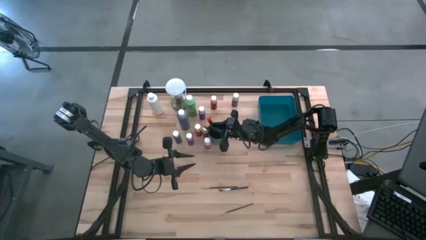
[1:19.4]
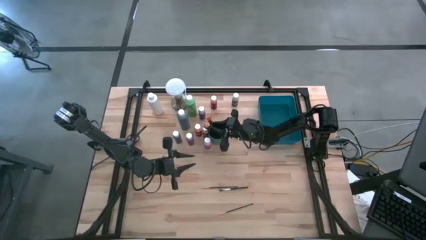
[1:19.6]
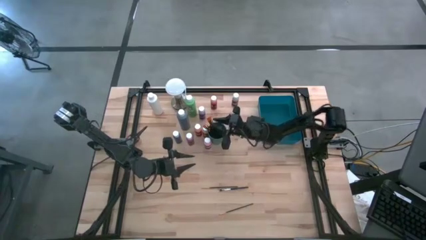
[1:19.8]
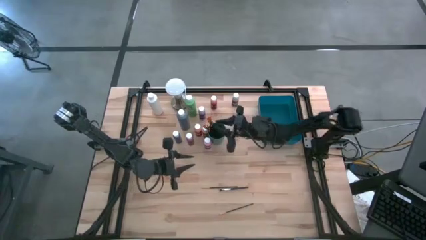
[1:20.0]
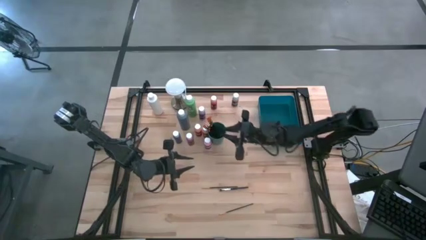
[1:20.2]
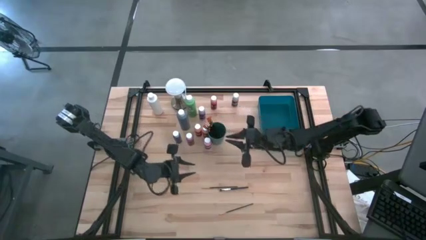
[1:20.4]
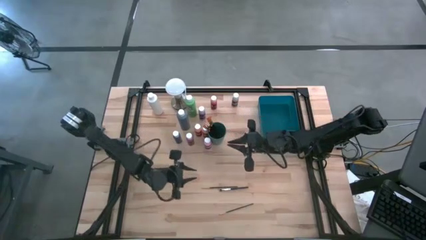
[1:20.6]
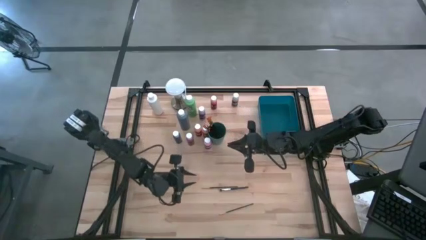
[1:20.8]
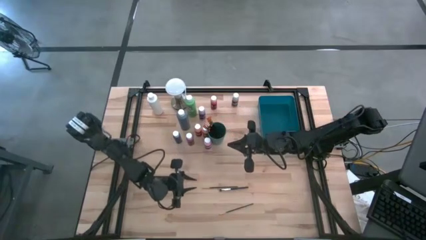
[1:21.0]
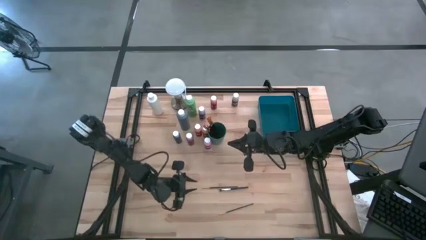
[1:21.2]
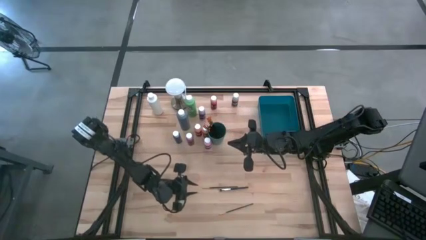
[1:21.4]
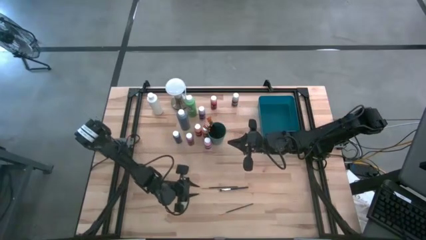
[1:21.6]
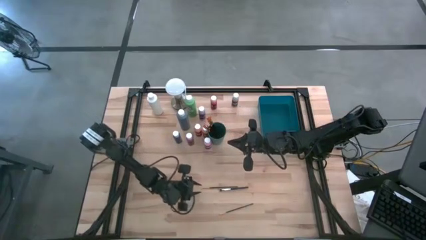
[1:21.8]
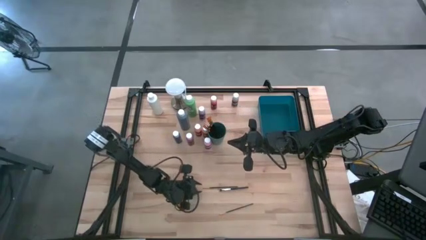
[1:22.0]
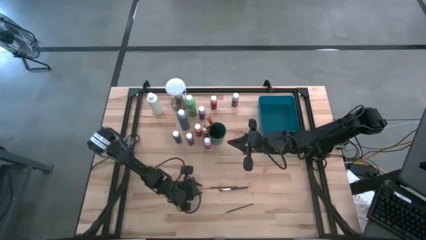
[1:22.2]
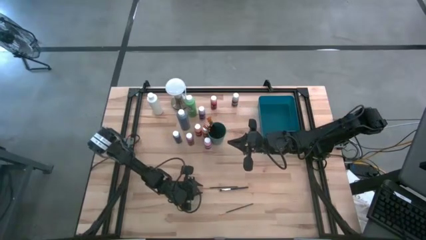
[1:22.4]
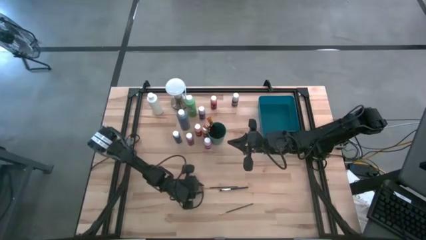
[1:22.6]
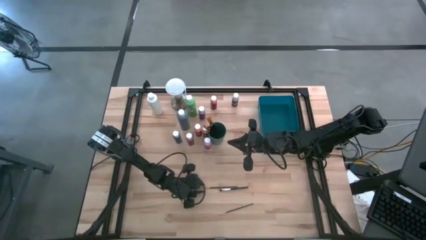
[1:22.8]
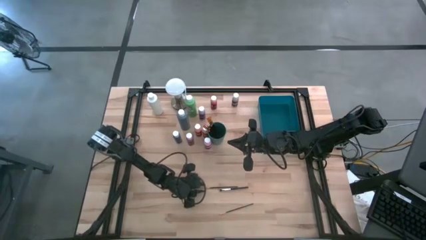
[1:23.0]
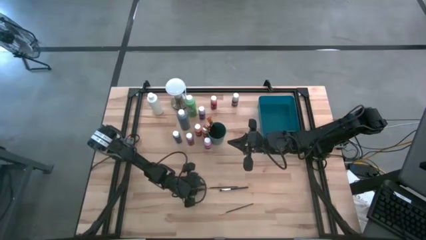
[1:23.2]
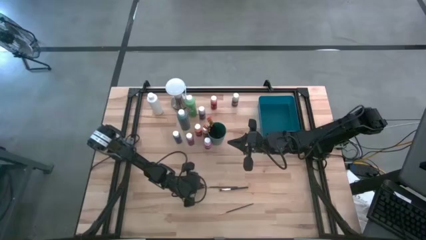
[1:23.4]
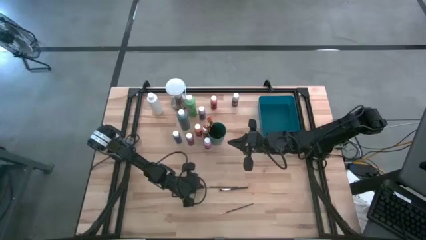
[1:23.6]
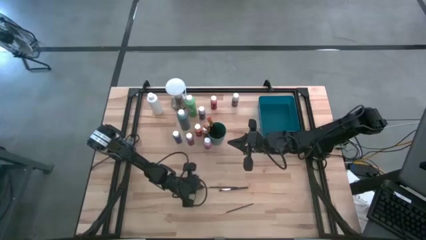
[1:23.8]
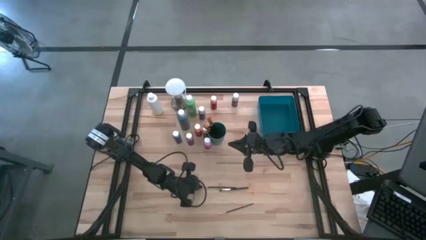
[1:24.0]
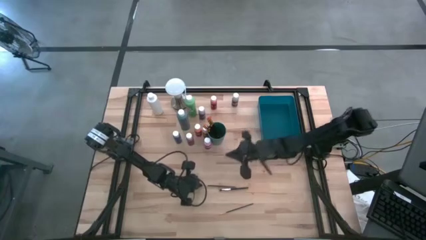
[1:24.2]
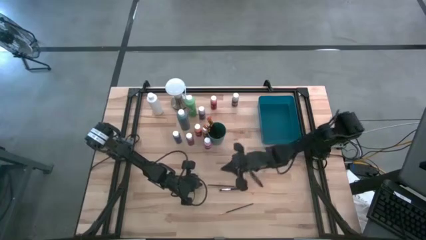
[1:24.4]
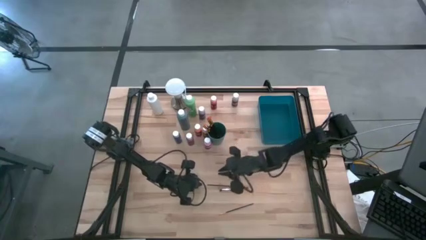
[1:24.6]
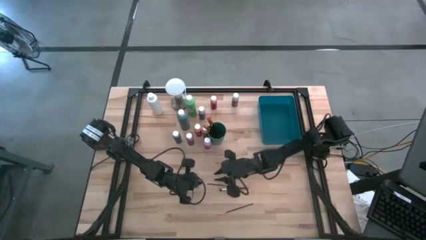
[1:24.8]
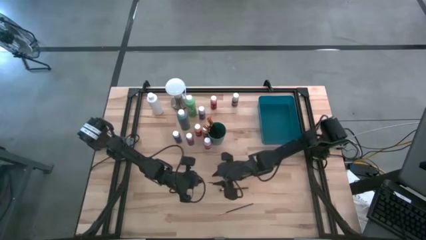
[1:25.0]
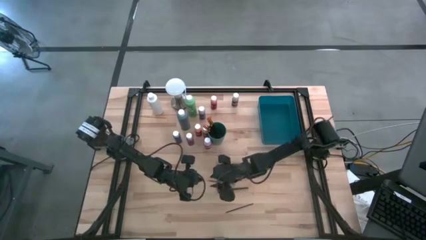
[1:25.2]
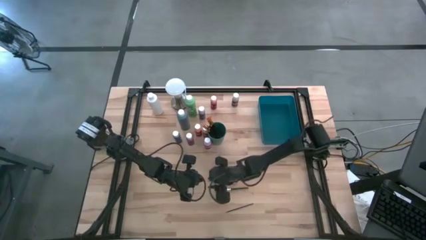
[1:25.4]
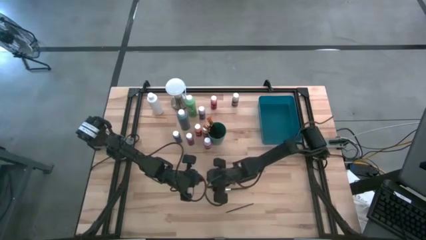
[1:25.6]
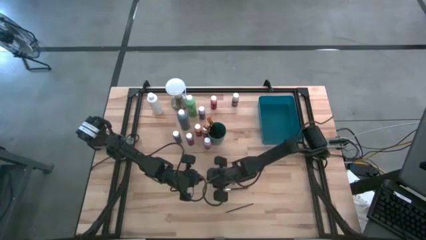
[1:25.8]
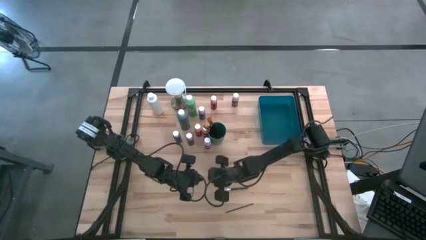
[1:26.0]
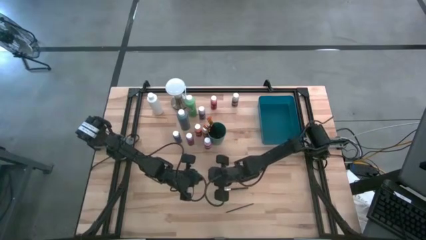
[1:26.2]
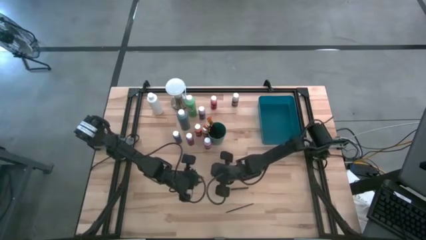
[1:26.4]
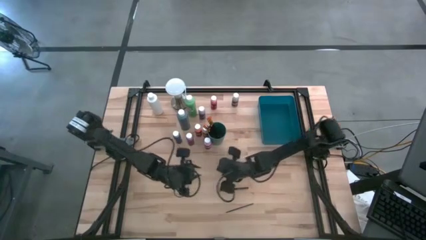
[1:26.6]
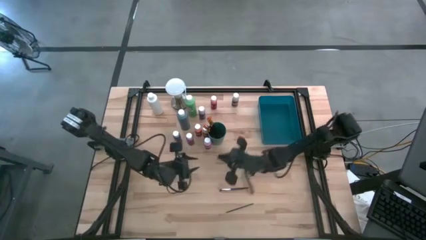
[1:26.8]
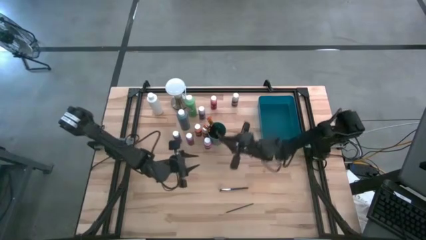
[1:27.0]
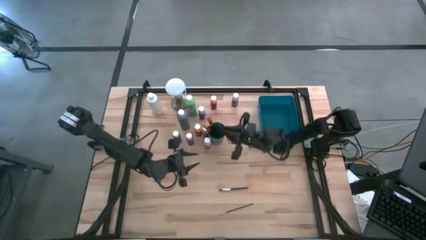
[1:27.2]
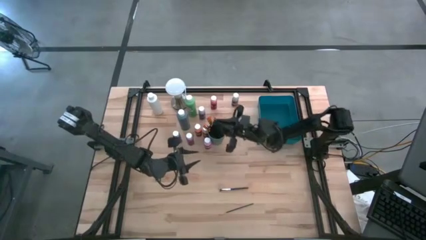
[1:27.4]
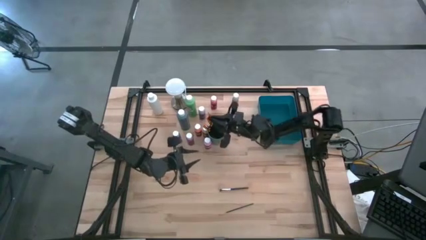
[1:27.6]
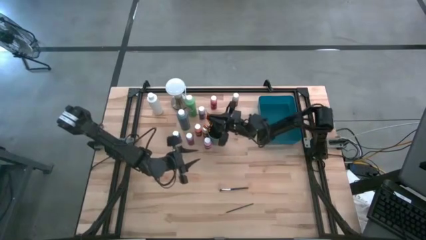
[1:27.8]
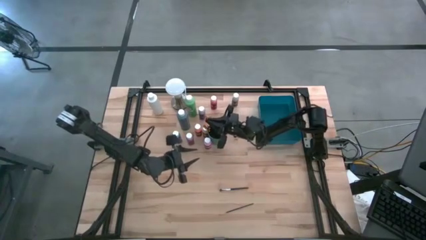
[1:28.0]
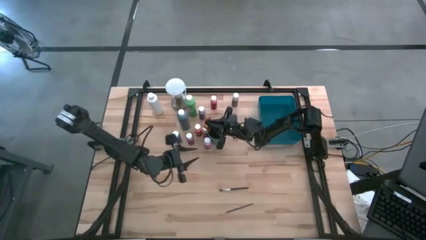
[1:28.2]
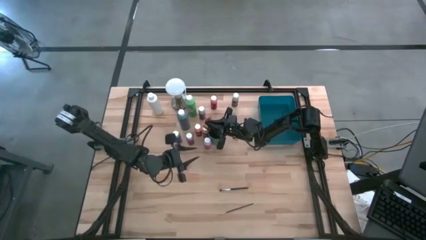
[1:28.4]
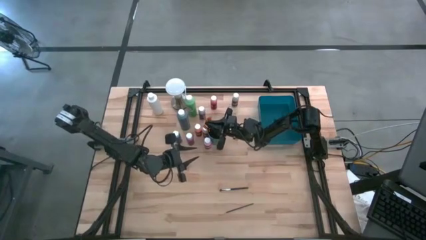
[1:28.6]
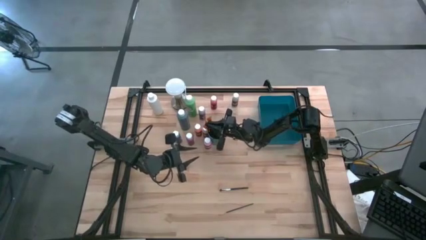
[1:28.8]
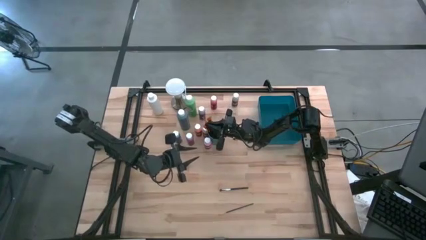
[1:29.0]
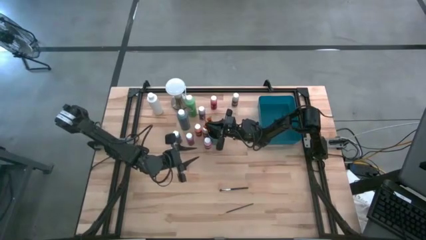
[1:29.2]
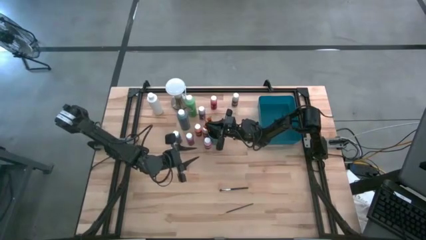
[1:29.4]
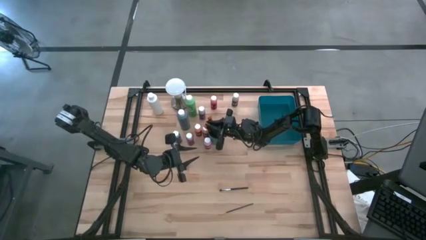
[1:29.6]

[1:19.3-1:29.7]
Task: Pick & Place Paint Supplies
Put the gold paint brush into the green cup
